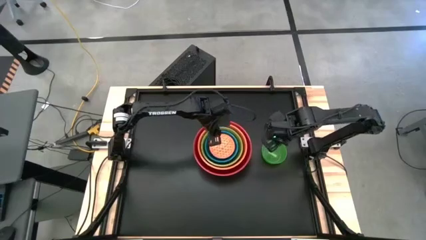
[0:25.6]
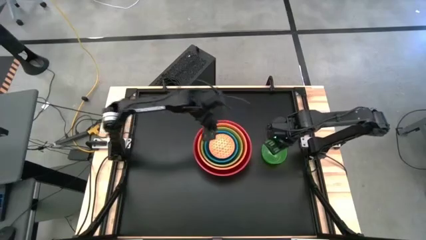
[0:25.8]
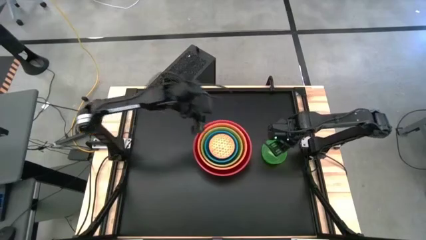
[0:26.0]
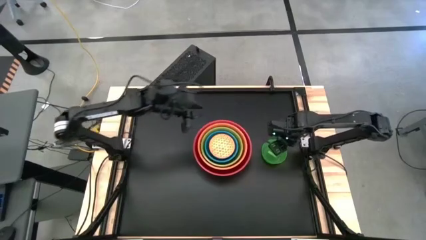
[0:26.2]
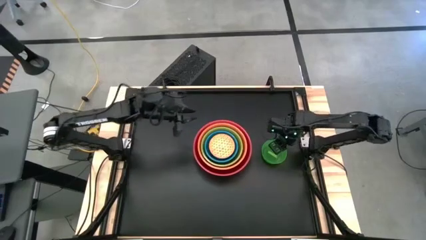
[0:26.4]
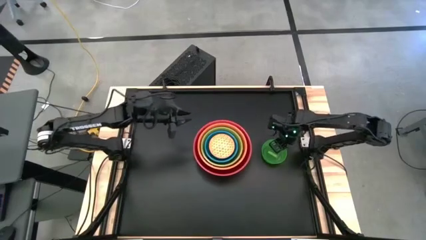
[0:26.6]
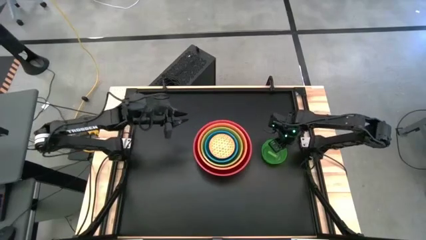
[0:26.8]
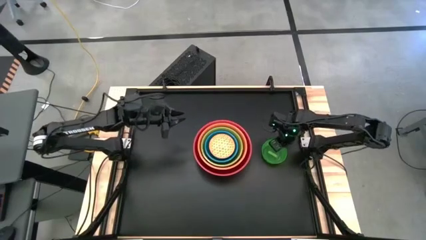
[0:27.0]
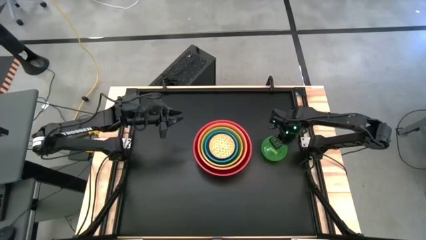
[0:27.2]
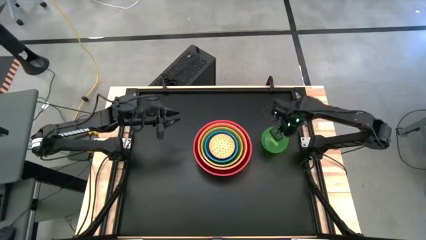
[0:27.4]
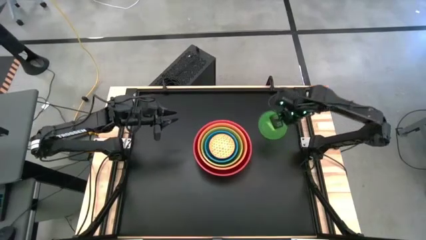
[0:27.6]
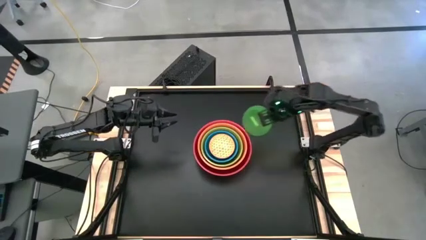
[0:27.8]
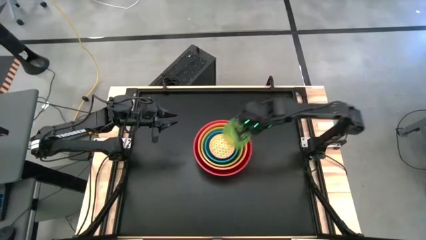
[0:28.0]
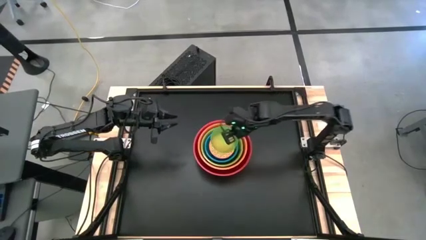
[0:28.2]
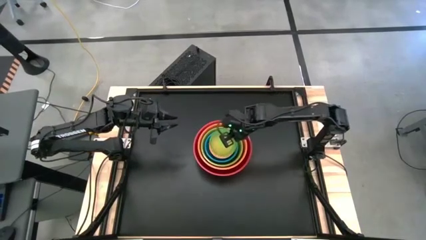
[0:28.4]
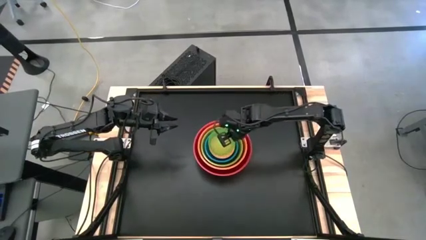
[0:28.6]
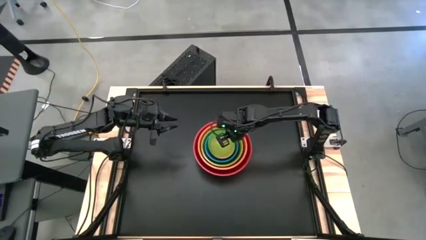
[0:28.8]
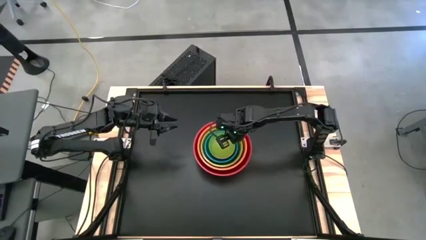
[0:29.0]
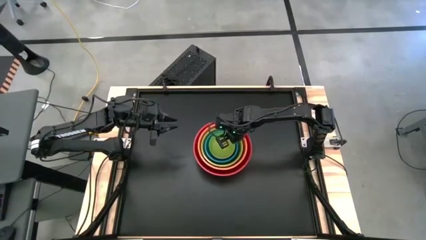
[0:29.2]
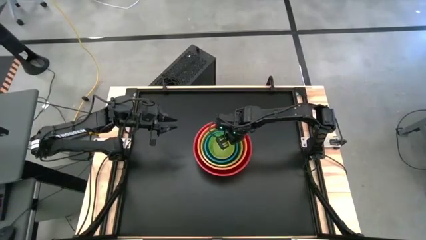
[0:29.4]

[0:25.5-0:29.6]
Stack the green bowl on top of the orange patterned bowl

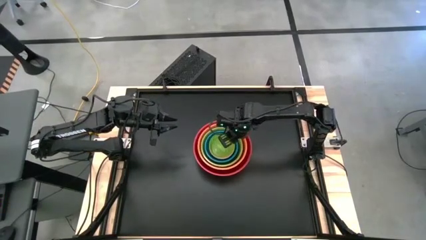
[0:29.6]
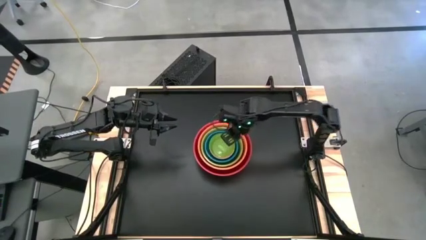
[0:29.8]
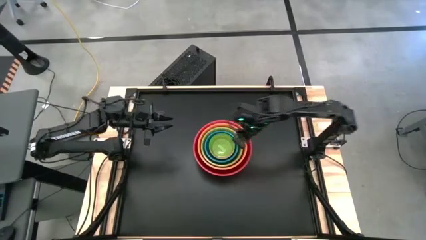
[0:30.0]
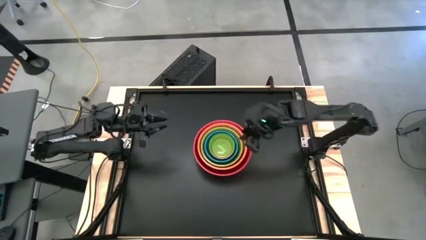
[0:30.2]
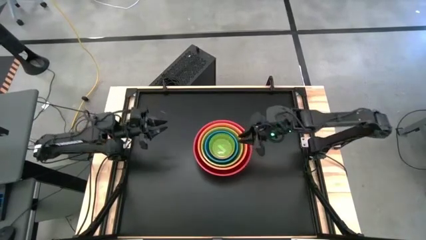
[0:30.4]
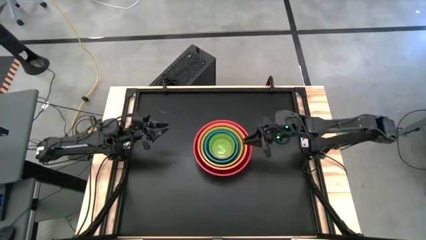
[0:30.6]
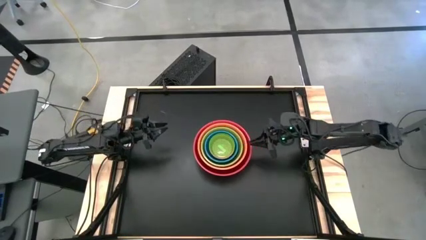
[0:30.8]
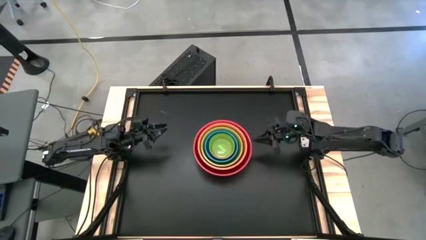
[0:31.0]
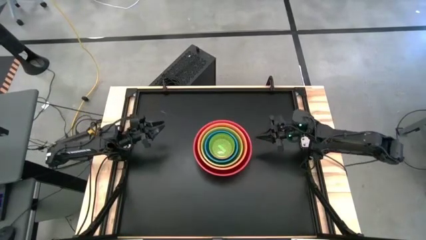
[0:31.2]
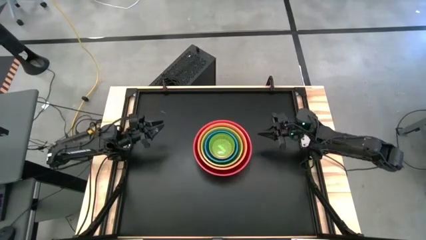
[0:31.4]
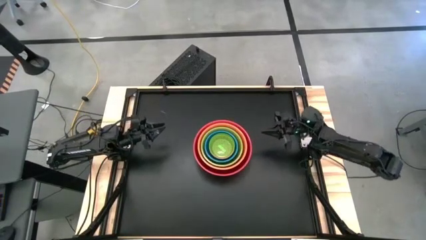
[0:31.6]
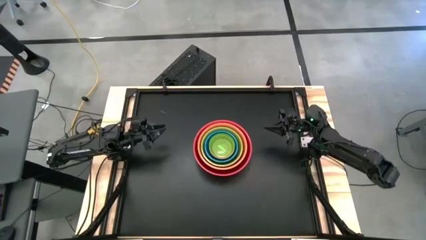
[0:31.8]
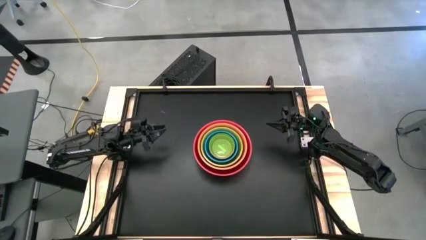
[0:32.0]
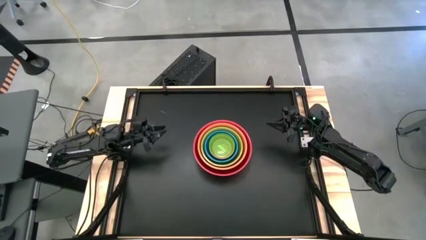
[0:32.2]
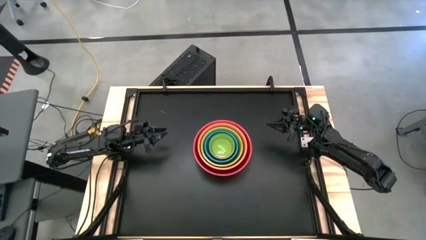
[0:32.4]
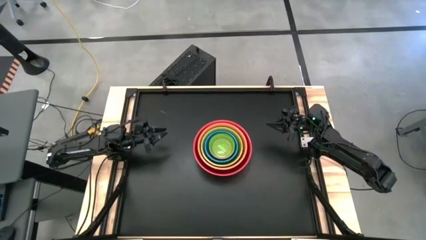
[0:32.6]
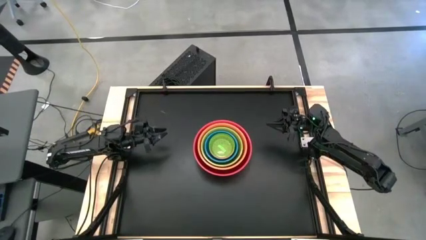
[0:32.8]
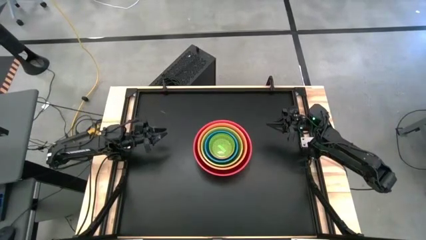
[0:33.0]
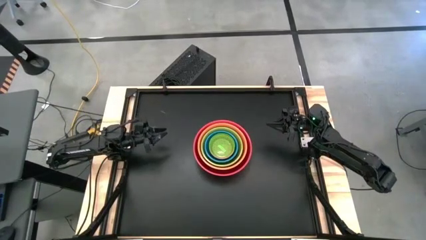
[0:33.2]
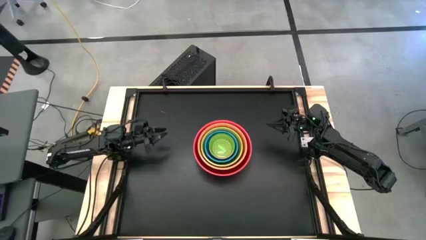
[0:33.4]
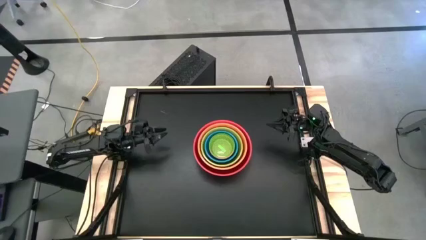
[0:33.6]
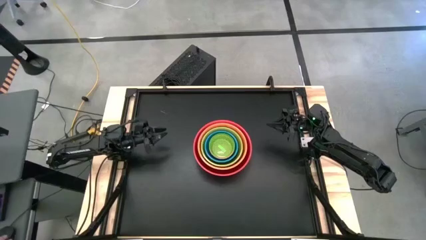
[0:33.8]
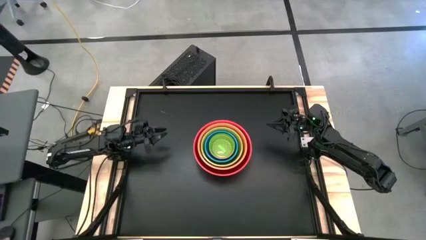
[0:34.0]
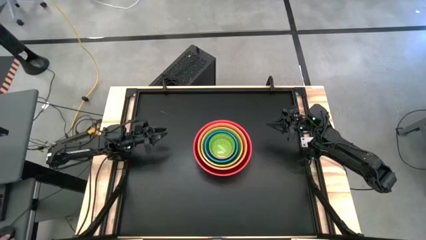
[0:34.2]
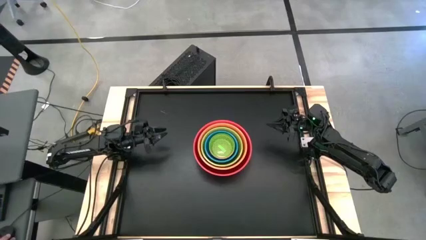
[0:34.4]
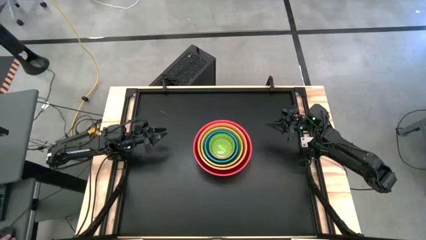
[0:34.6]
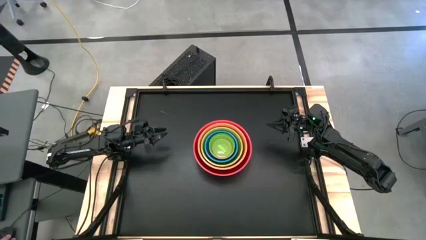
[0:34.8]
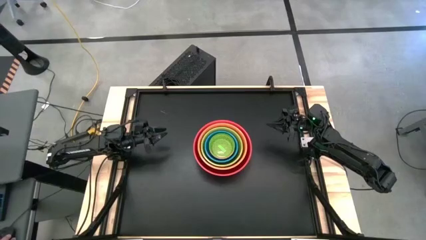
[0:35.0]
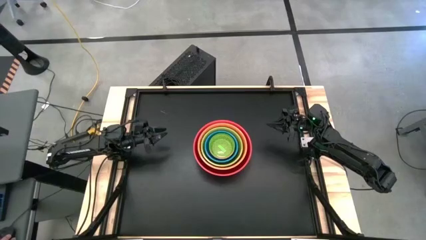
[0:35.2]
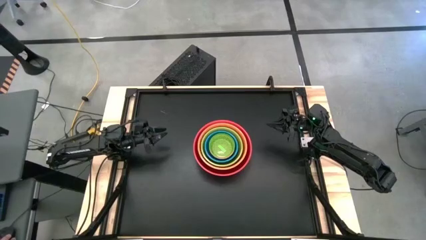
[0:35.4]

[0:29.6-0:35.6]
Return to Home Position
